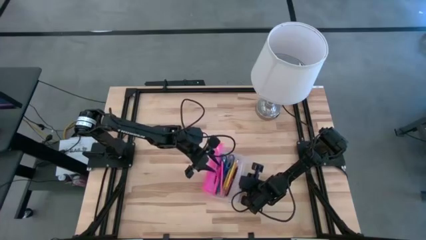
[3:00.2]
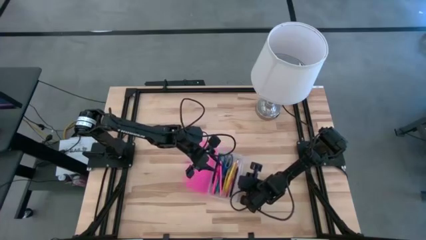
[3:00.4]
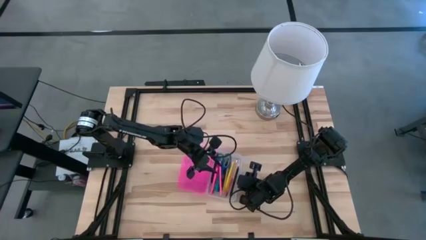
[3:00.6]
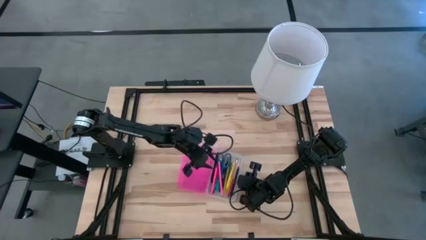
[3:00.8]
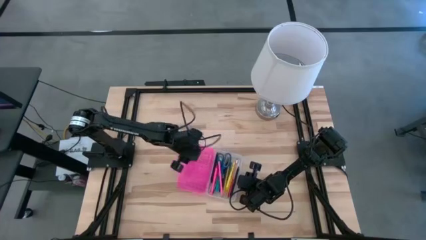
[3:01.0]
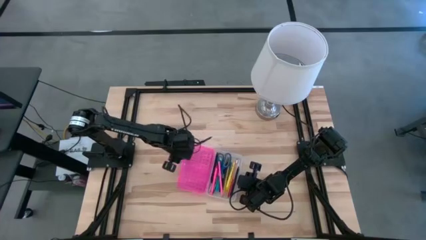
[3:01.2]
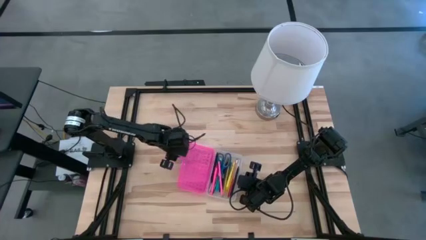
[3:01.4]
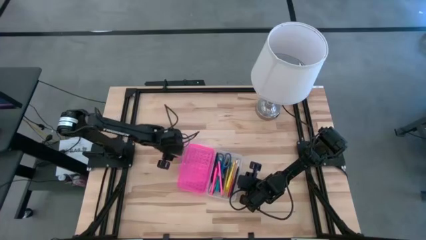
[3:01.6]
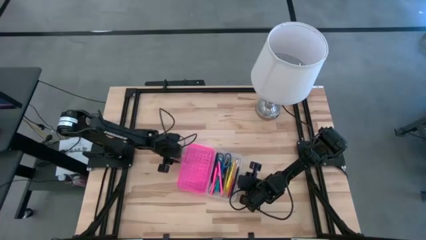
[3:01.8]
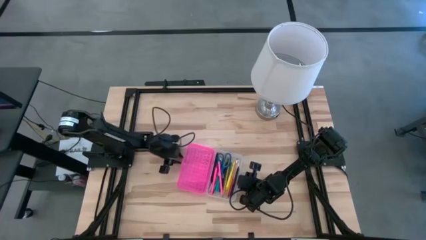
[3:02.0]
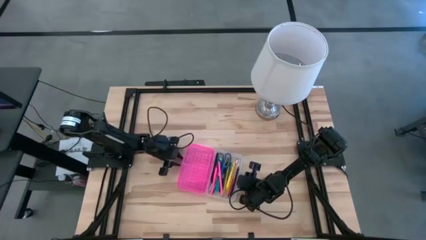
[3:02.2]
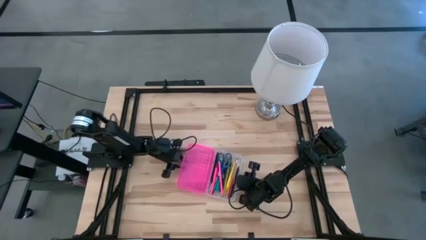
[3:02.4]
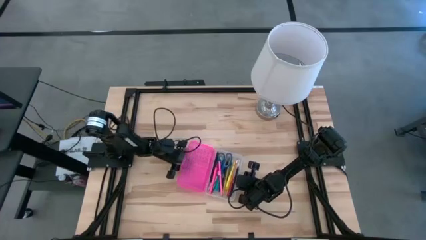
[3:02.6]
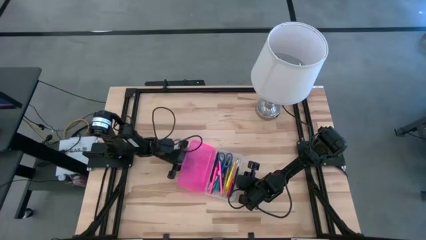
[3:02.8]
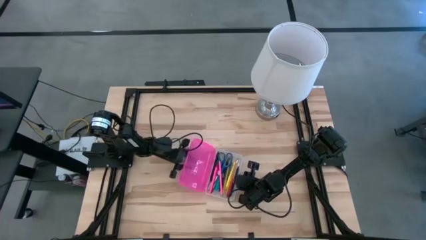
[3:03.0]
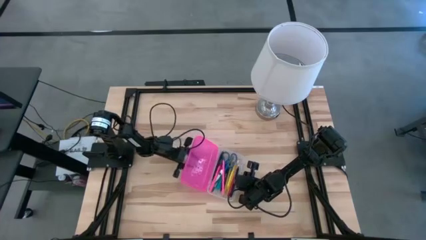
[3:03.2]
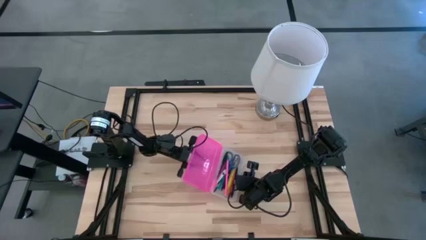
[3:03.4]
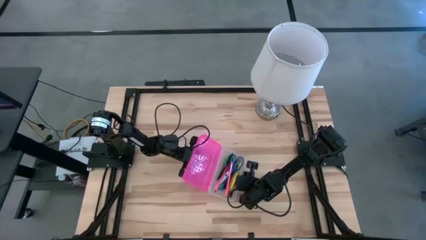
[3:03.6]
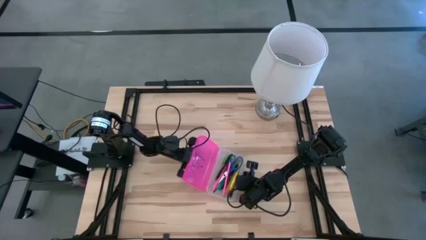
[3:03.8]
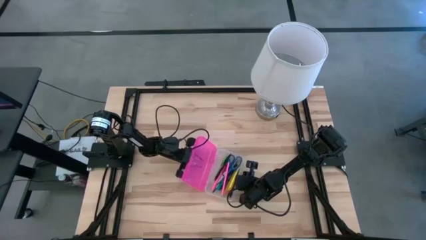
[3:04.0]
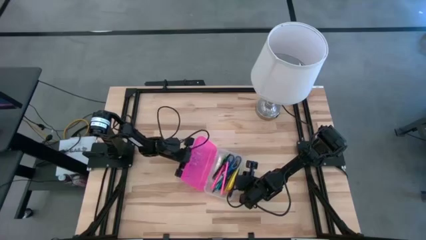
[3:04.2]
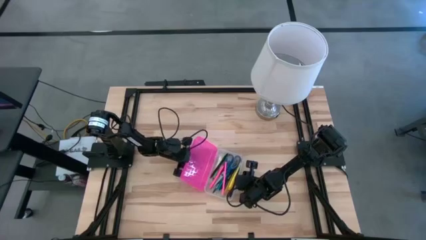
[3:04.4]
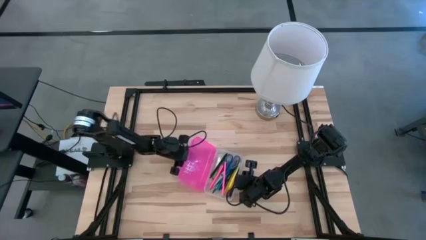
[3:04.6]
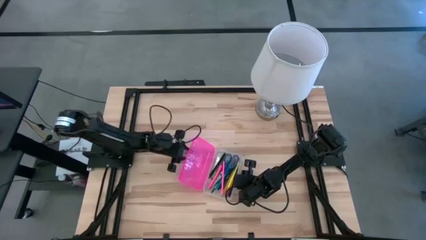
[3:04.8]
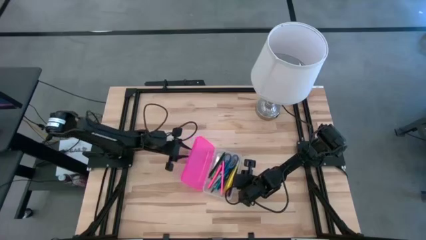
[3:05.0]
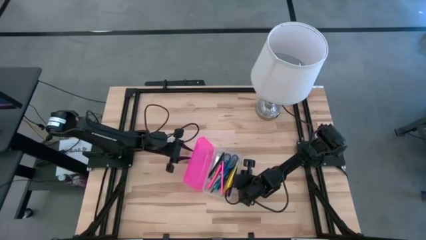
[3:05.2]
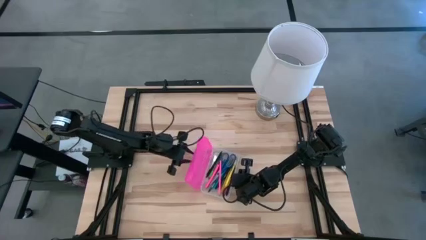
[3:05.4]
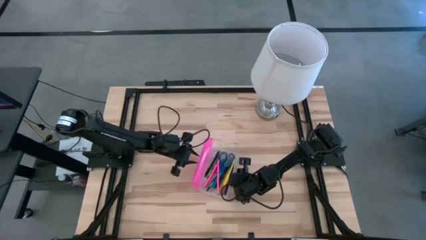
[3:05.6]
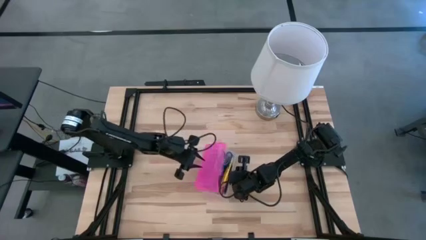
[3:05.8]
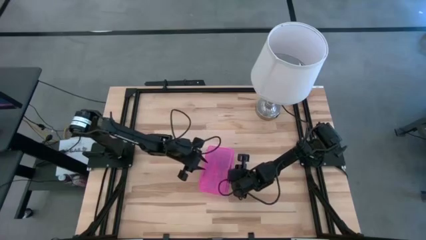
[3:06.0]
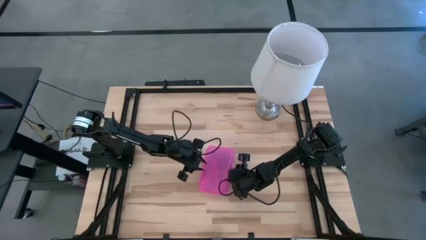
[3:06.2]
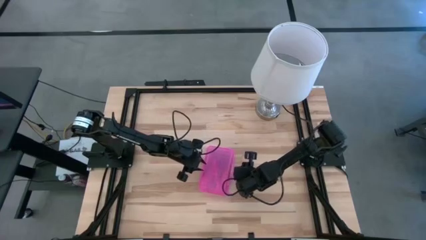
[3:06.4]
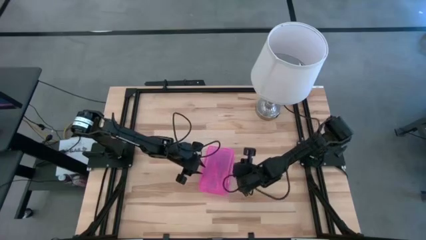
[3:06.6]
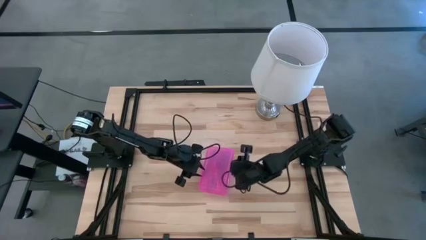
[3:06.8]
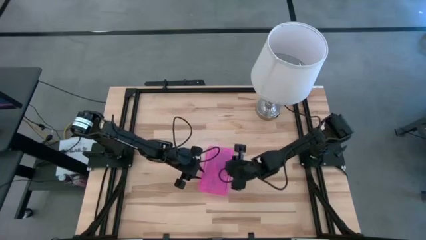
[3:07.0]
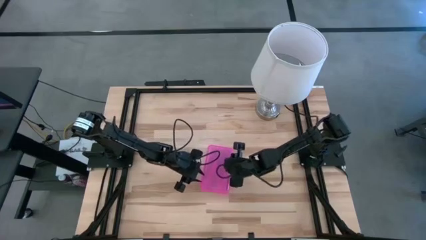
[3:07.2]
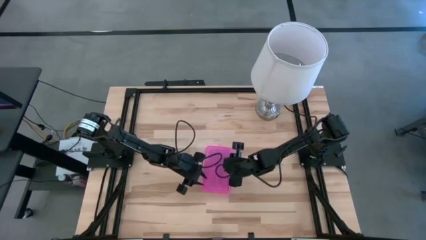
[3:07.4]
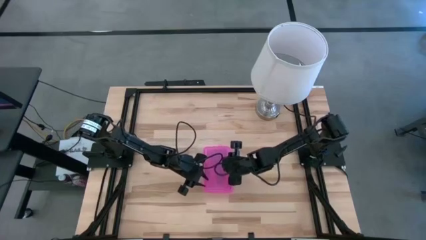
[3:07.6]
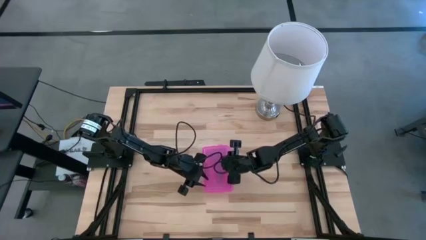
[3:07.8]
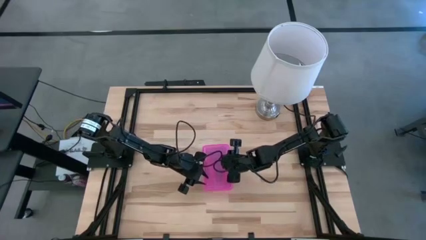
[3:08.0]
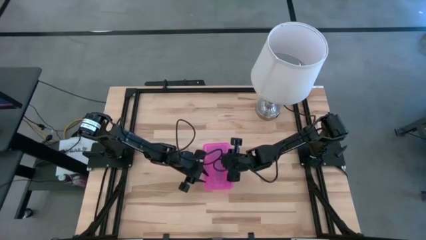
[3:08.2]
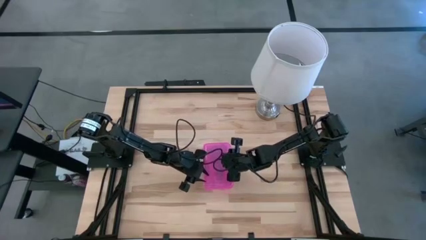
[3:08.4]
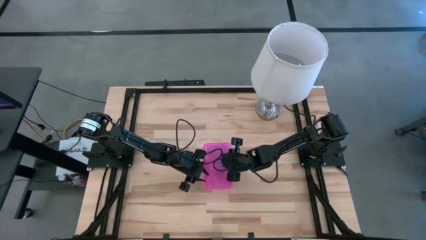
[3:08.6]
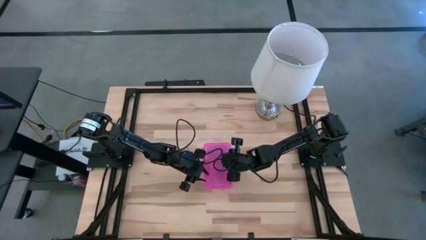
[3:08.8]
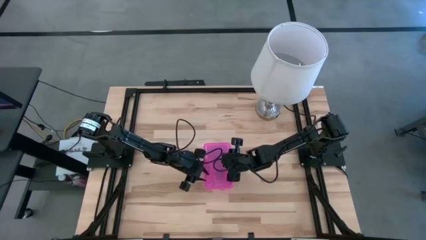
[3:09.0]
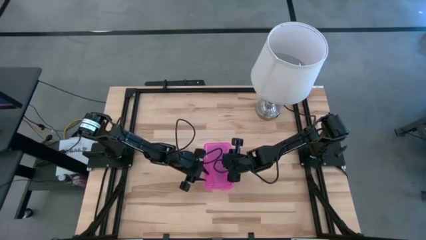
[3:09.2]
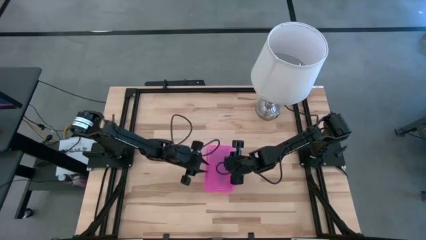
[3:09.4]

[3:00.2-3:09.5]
Task: Pick & place school supplies into a supply box
Close the pink supply box

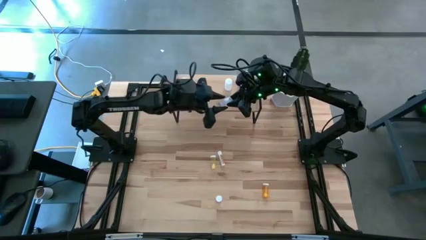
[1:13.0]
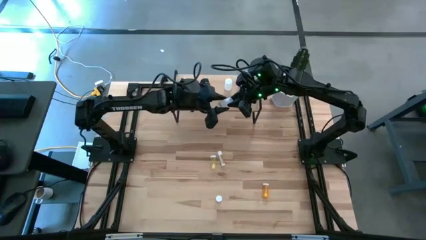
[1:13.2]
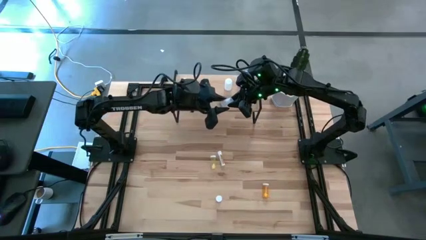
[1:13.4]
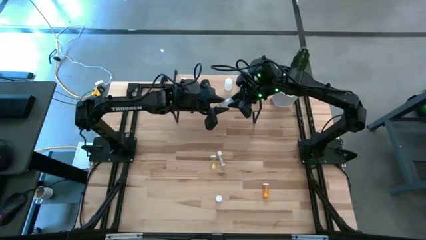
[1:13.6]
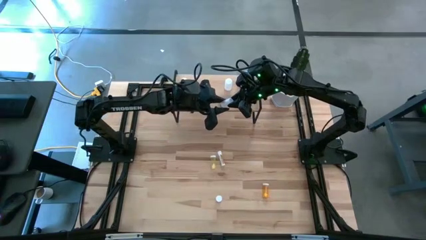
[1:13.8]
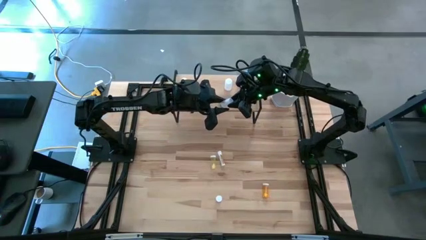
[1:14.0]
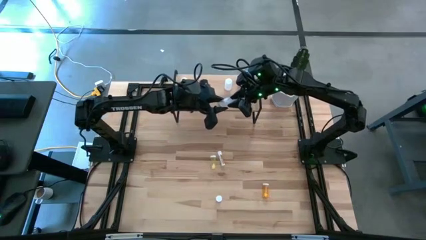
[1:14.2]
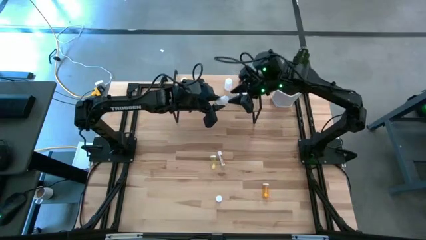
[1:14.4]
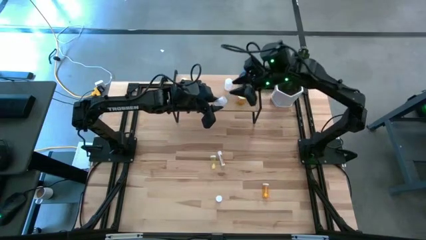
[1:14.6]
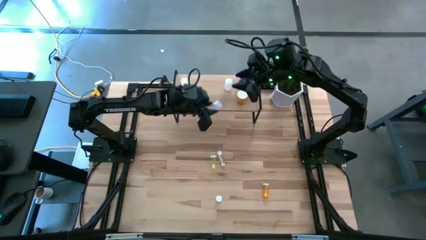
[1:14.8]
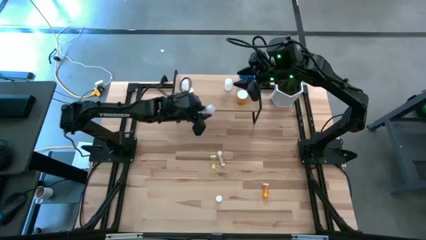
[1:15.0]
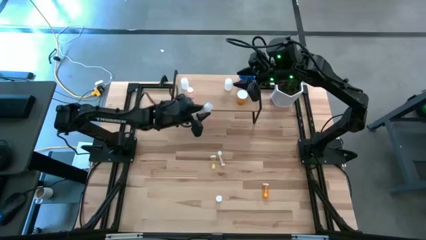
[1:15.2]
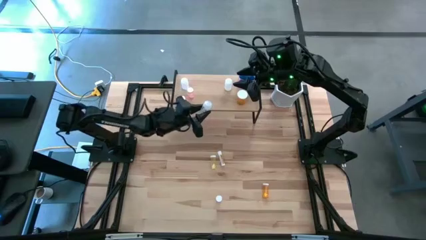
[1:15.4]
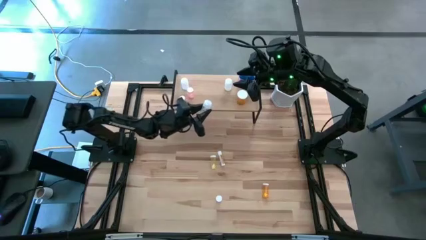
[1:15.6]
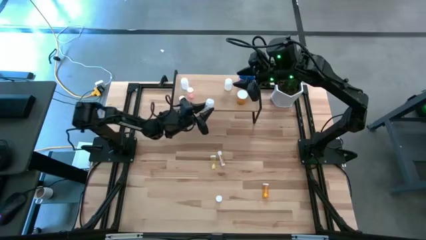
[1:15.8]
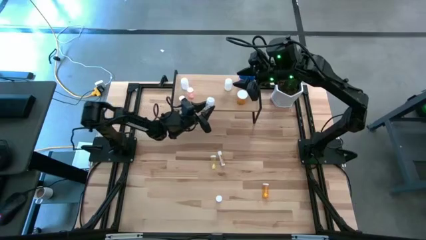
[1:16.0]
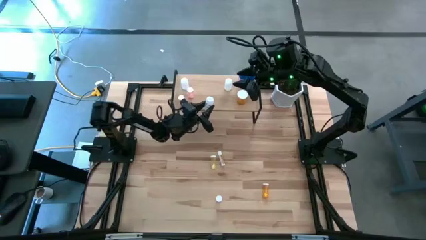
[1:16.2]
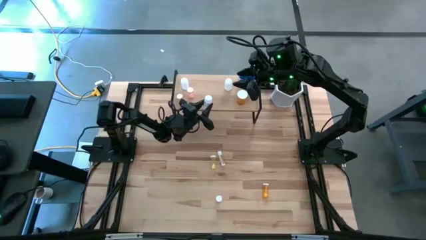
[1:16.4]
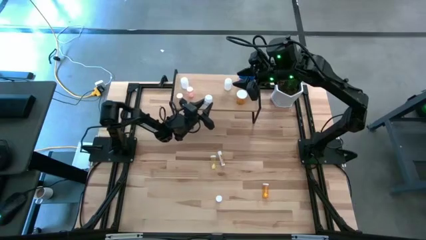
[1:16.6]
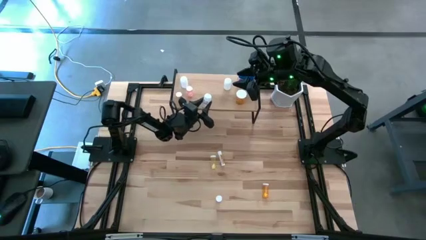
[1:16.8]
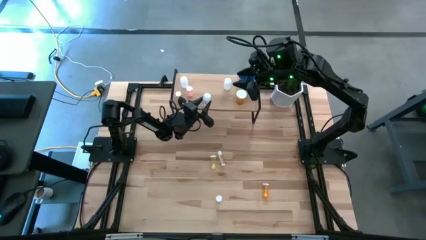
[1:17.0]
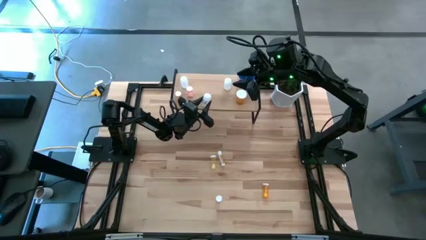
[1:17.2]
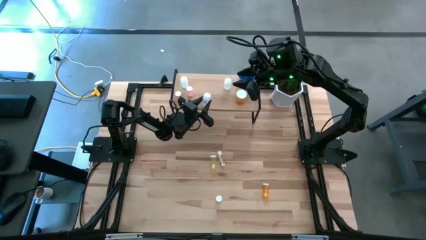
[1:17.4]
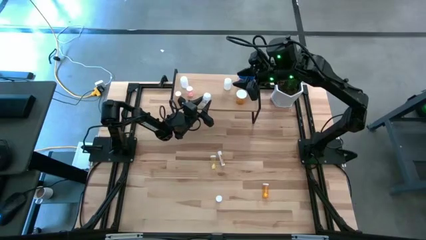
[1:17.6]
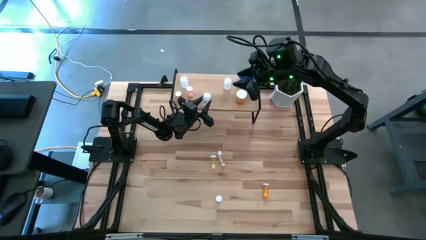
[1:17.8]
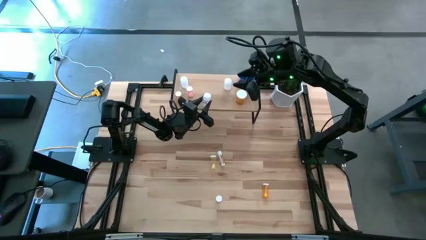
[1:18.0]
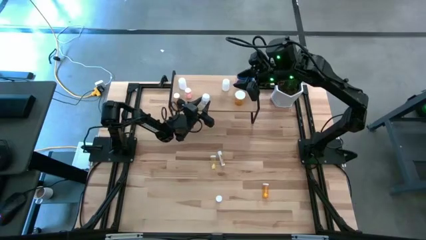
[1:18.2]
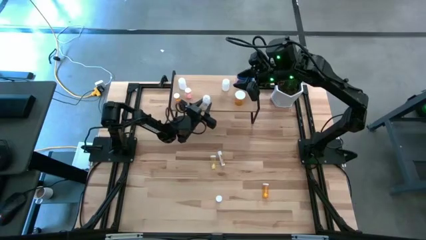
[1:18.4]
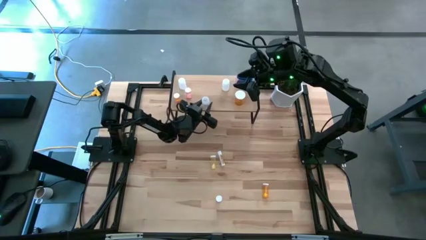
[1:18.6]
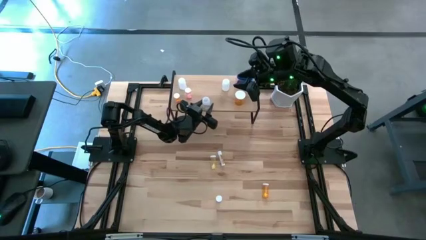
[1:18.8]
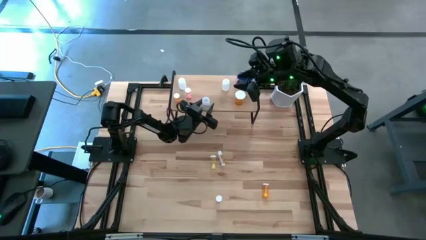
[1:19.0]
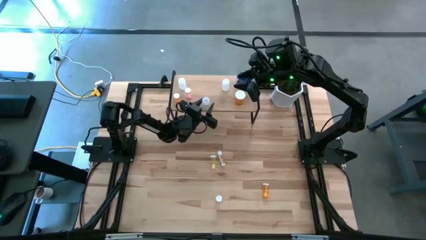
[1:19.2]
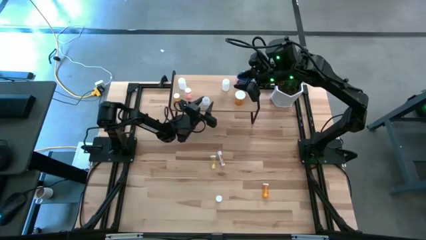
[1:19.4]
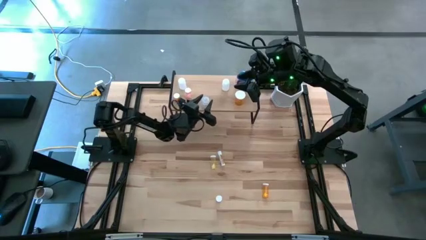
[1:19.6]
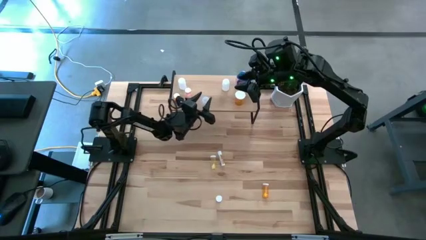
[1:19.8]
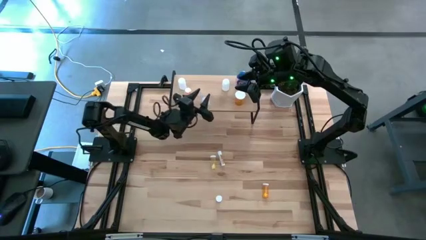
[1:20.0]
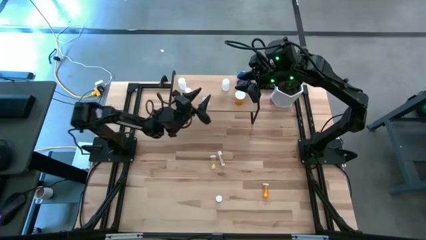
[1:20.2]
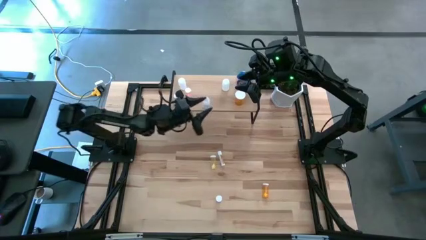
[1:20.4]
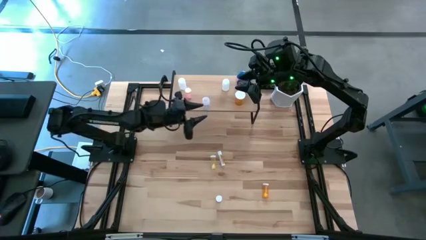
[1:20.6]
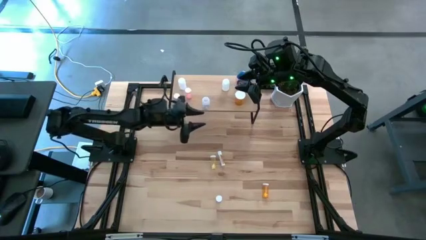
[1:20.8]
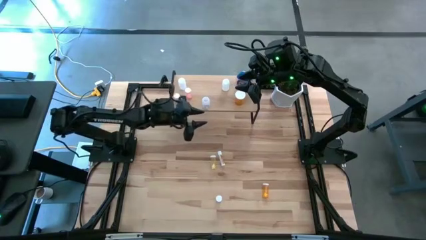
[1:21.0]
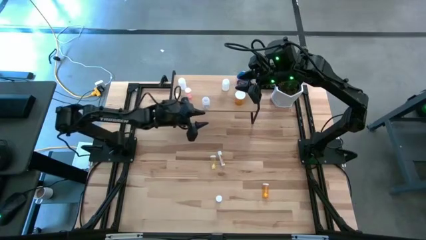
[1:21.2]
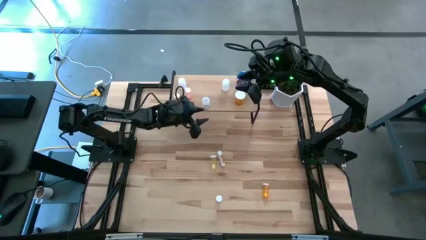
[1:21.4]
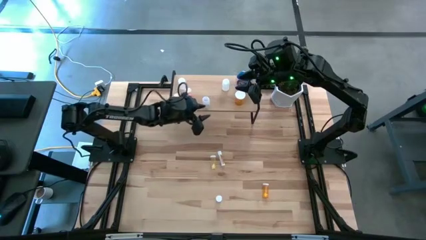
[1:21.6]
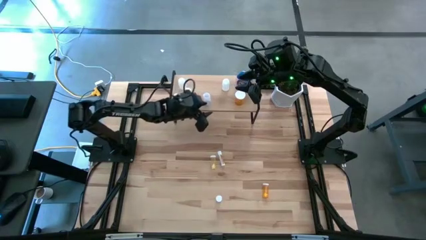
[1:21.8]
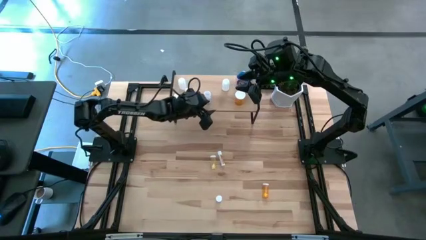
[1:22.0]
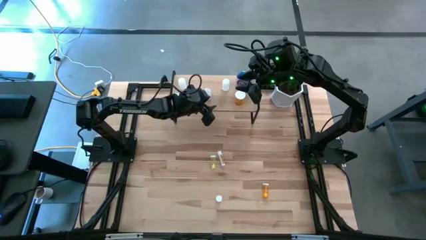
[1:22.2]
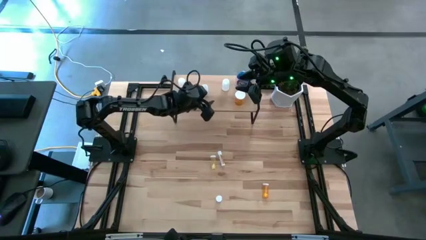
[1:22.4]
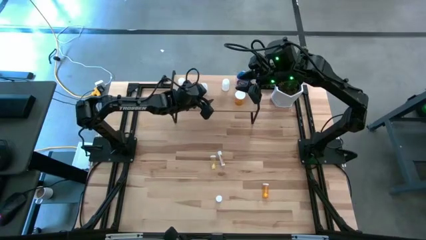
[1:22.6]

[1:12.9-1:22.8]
Task: Pick and place medicine bottles onto shelf by color
Put the transparent pill bottle on the shelf
